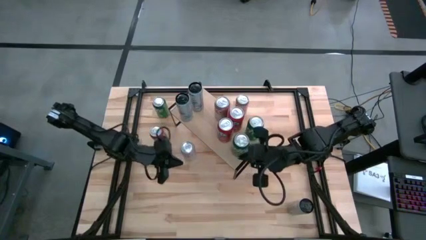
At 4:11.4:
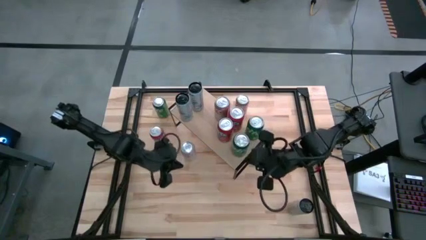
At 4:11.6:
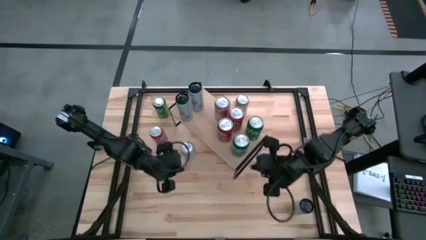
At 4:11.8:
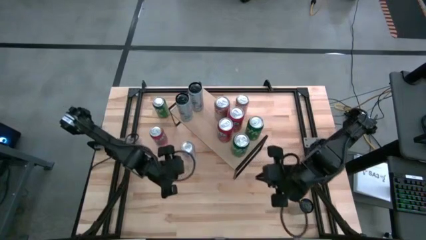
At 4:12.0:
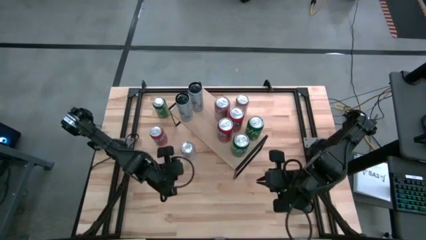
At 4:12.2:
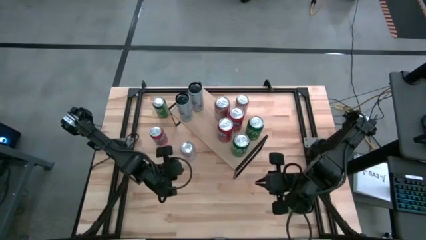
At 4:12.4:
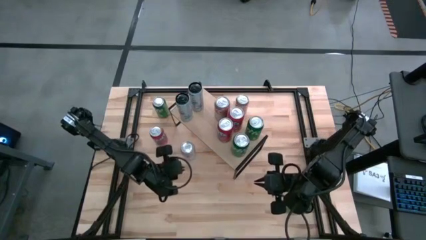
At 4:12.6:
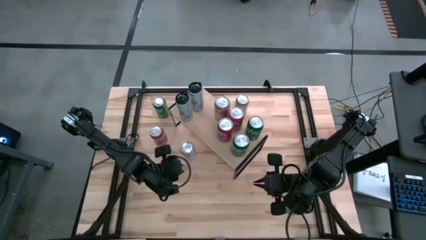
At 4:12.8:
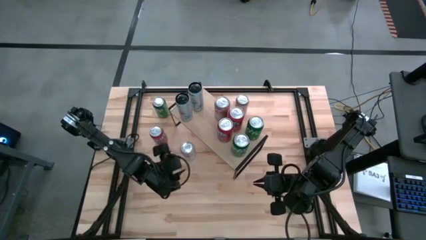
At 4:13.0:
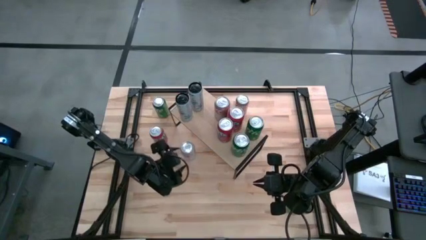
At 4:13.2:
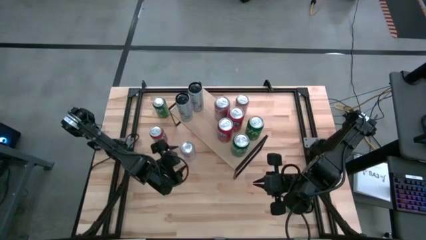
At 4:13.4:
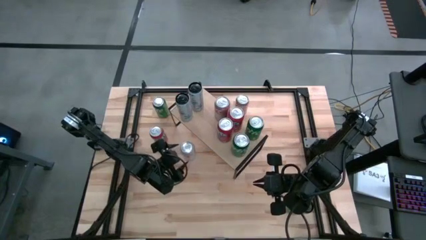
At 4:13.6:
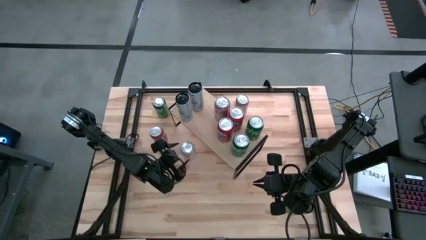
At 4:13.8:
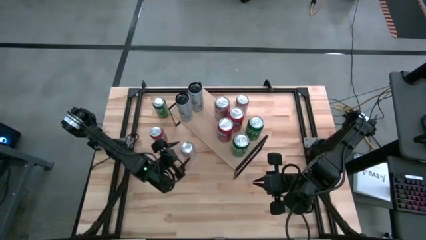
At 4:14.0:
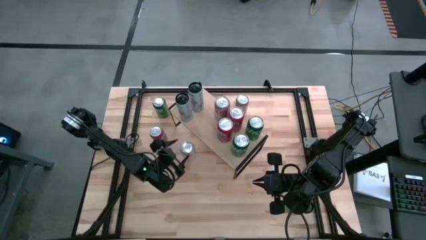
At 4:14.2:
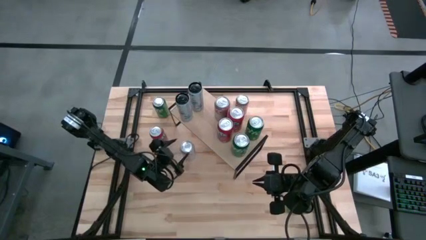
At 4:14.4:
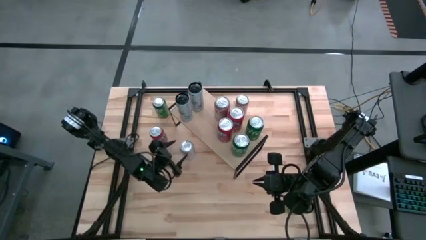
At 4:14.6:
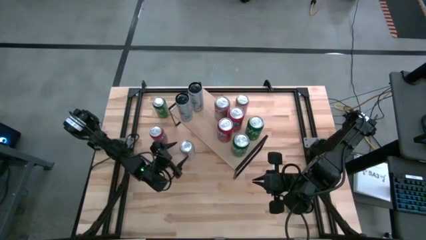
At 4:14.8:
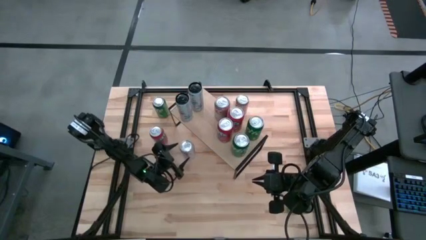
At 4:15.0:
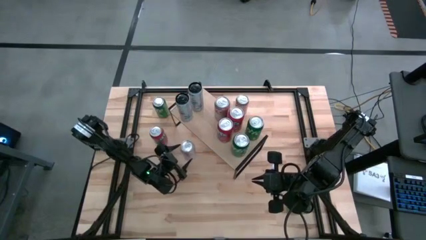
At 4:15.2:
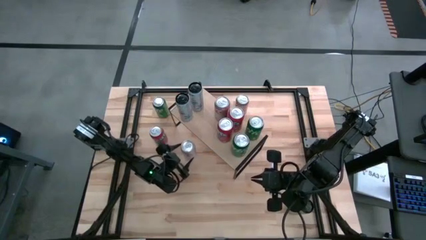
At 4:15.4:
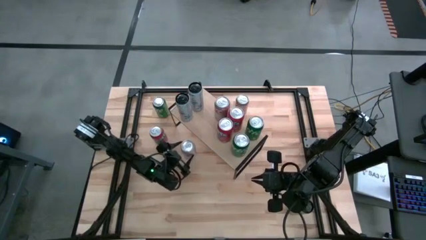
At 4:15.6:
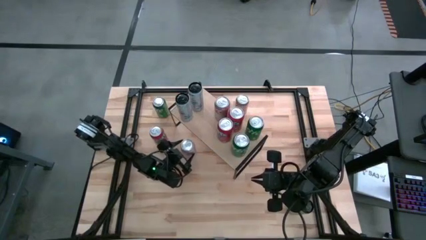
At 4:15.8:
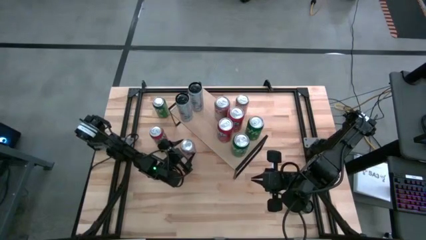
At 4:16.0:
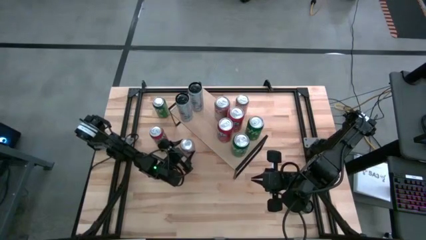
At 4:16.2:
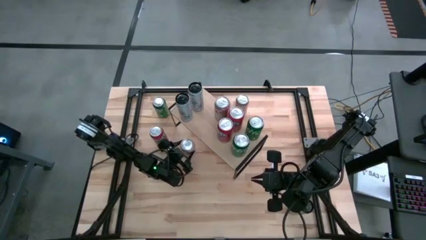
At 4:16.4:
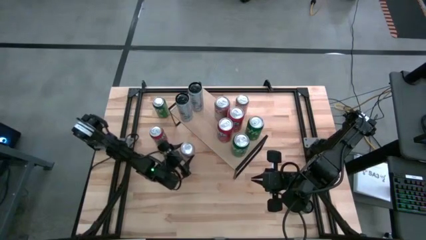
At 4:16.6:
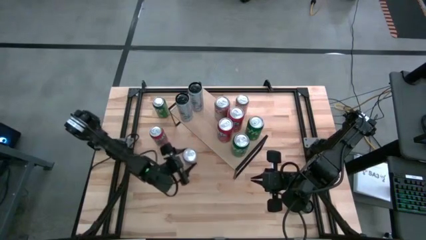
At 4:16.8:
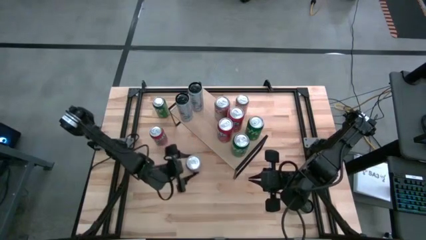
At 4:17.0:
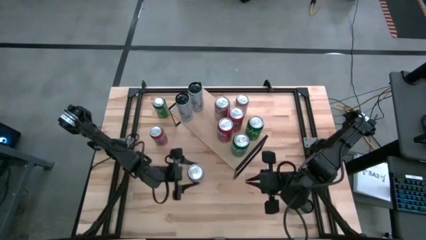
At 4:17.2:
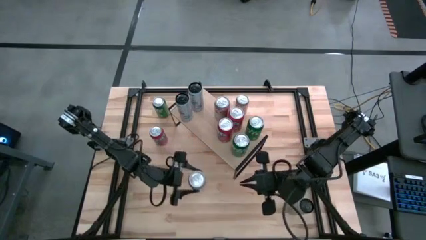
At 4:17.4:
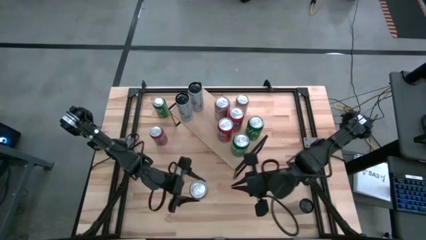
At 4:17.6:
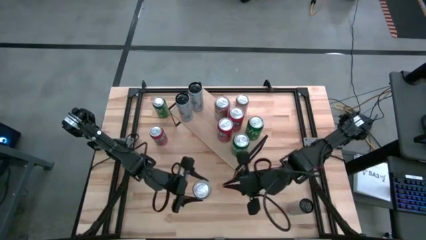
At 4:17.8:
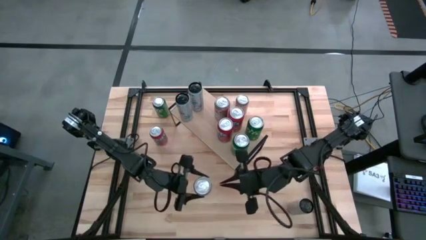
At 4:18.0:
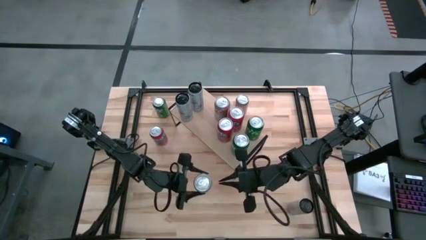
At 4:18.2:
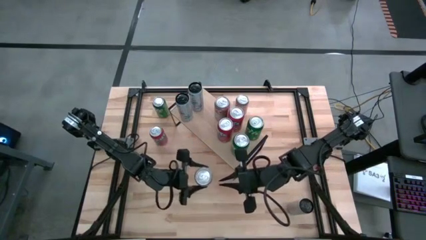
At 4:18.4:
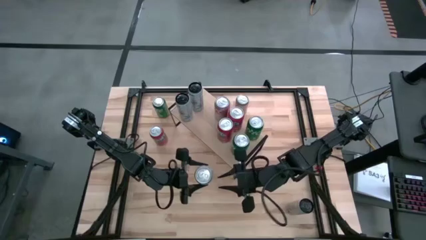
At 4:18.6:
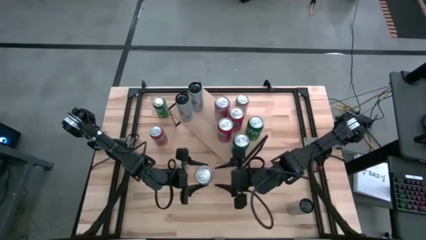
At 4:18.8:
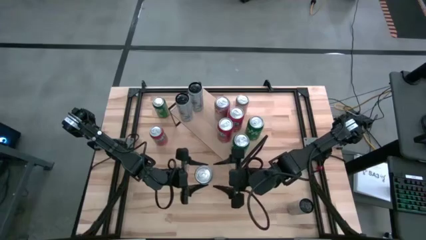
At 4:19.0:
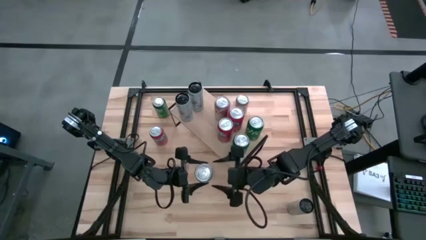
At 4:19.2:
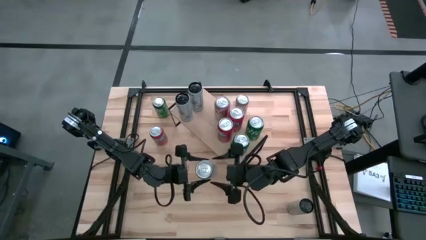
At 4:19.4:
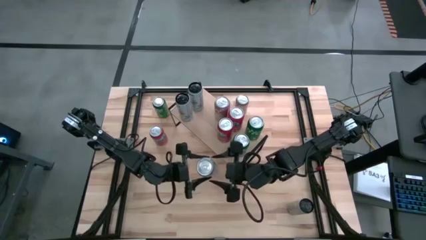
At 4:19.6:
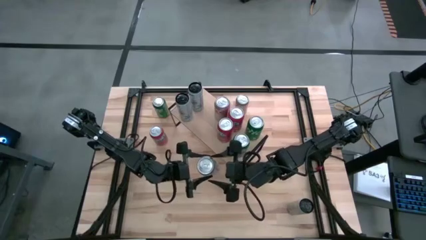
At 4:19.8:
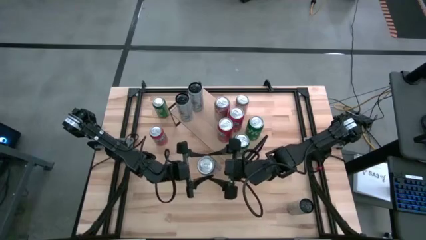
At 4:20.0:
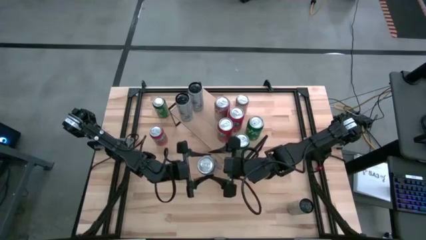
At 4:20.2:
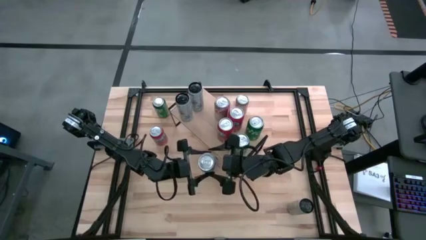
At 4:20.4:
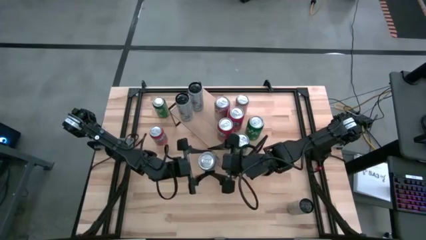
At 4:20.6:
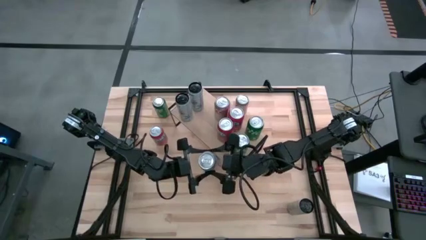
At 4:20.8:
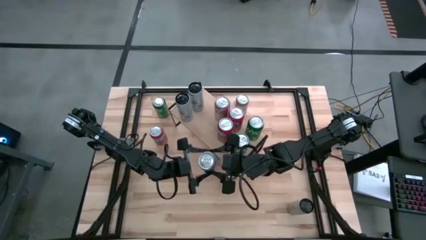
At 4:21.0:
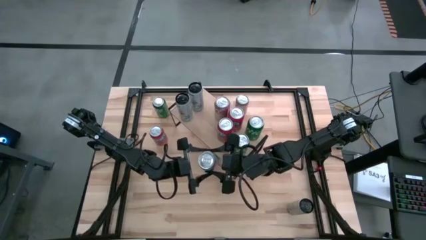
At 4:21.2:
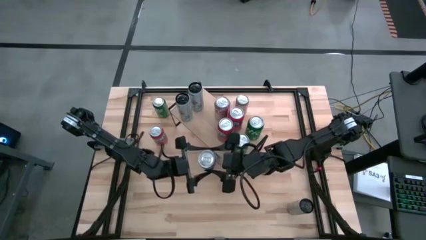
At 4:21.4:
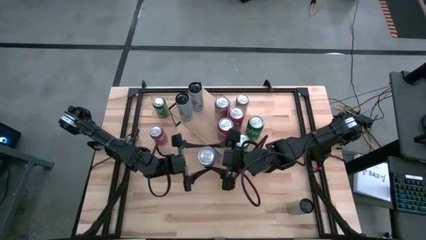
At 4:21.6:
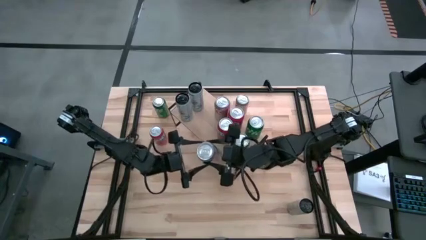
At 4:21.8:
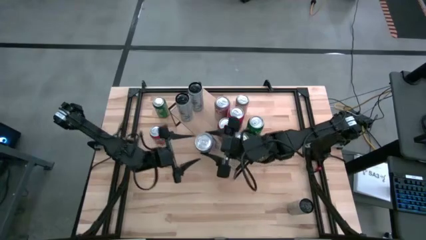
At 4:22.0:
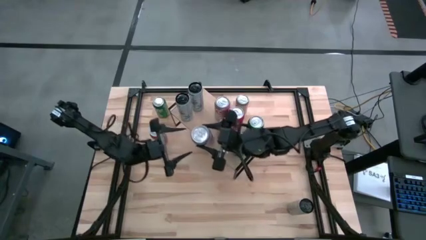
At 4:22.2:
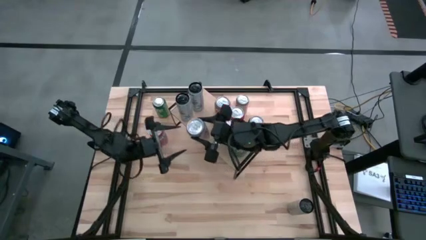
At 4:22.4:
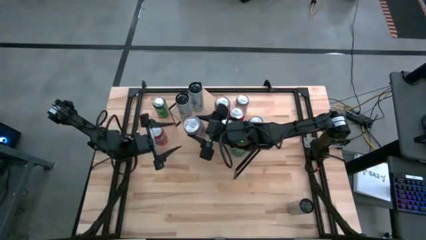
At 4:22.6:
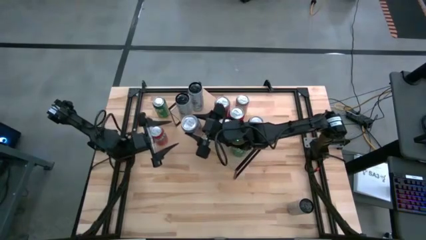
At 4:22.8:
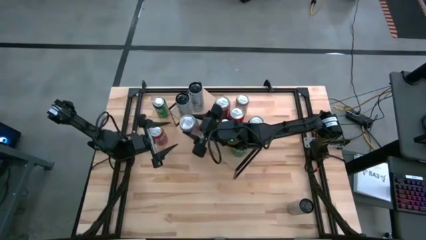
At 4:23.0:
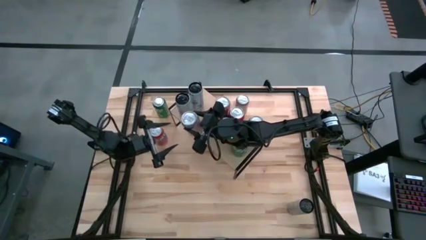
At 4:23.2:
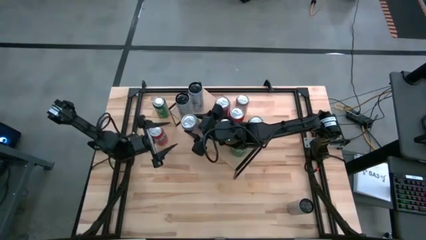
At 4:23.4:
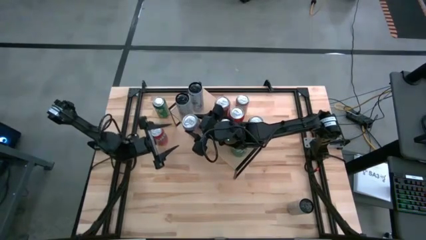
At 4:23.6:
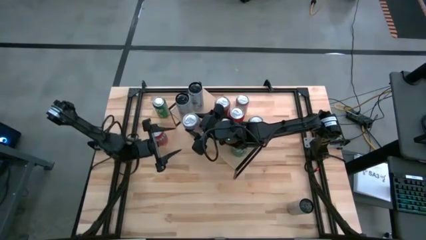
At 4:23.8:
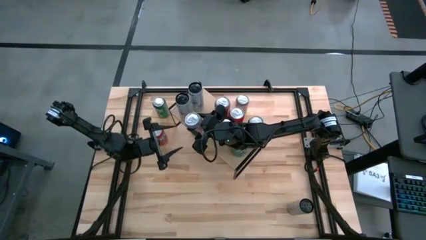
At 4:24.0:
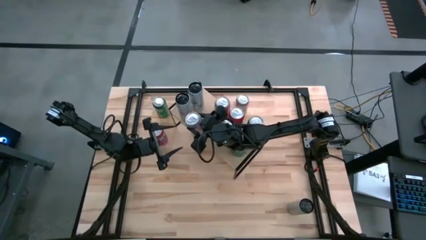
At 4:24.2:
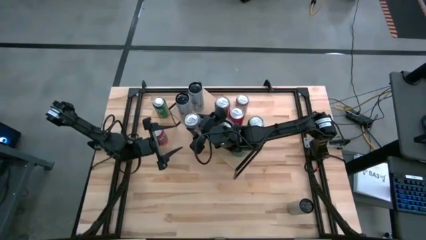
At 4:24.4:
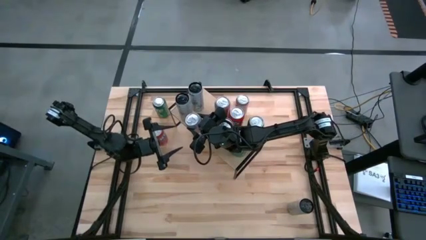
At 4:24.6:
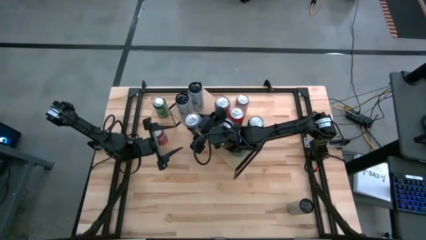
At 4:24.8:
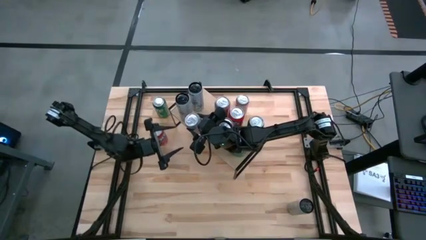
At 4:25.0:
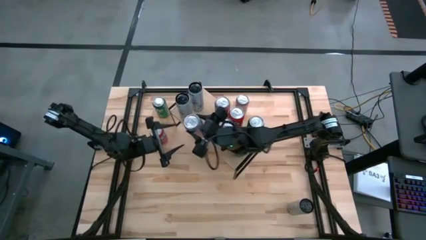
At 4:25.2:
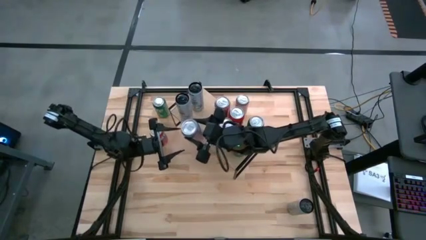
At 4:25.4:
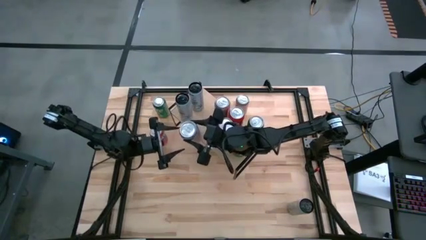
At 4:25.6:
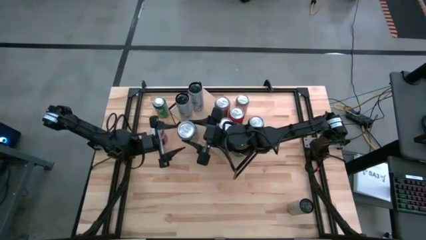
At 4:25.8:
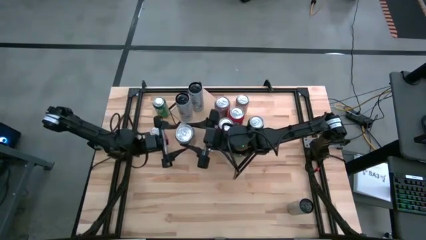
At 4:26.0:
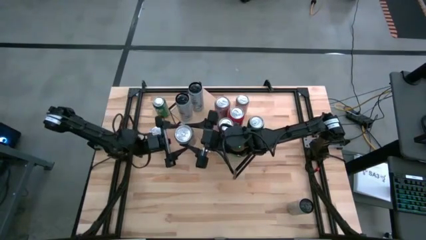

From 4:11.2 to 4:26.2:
Task: Place canned beverage on shelf
Put the silver soda can on the shelf aligned with the other silver soda can

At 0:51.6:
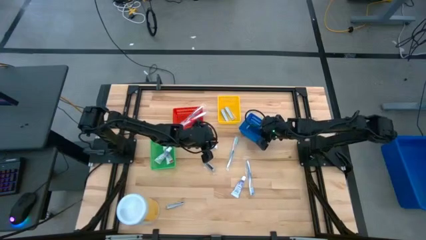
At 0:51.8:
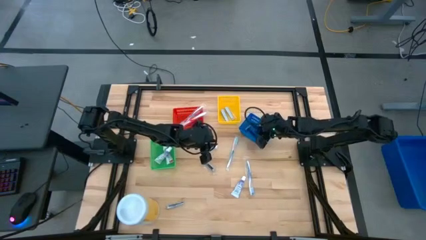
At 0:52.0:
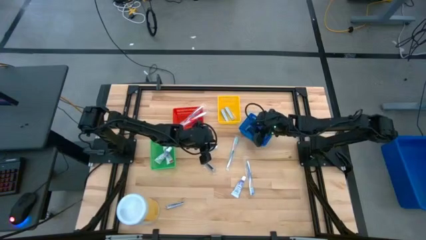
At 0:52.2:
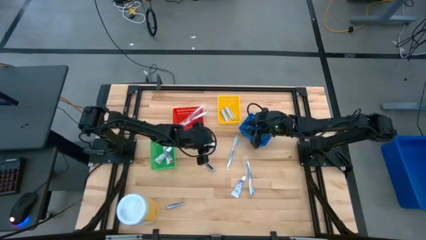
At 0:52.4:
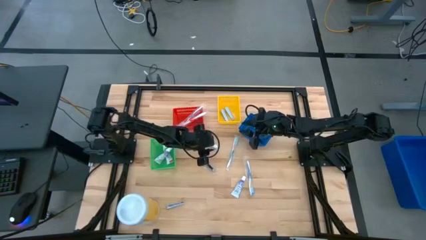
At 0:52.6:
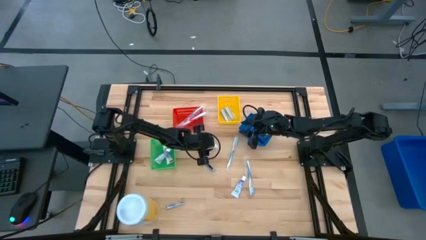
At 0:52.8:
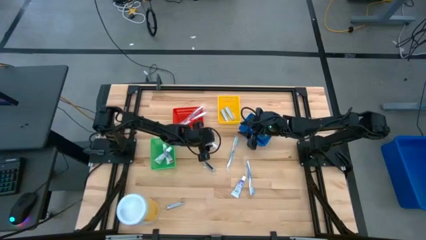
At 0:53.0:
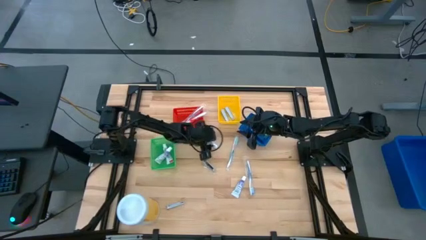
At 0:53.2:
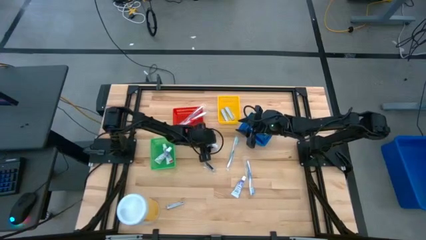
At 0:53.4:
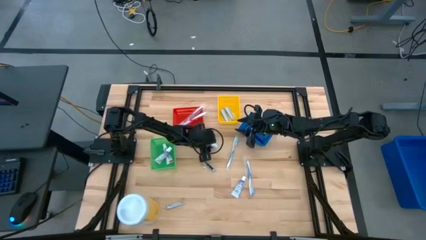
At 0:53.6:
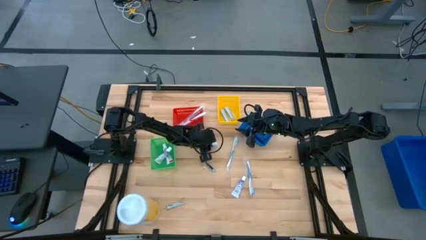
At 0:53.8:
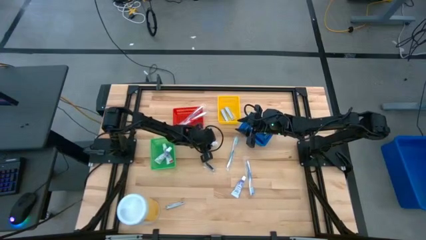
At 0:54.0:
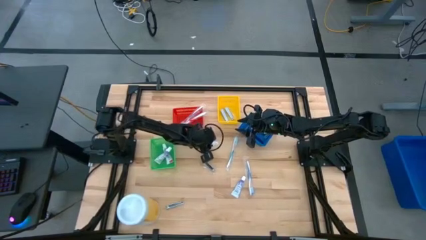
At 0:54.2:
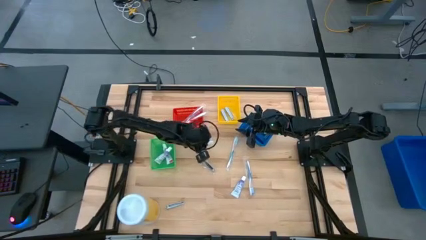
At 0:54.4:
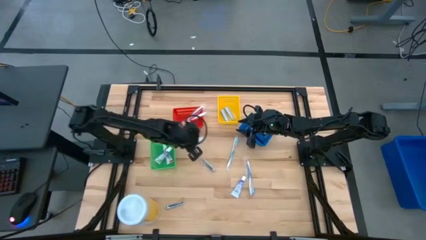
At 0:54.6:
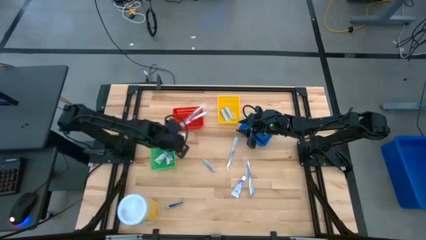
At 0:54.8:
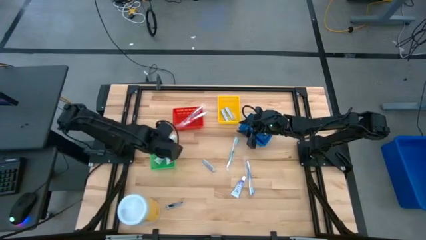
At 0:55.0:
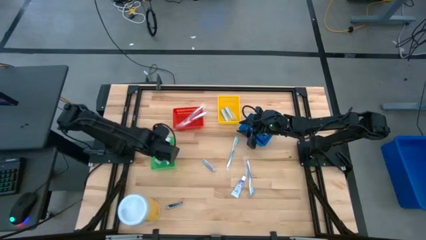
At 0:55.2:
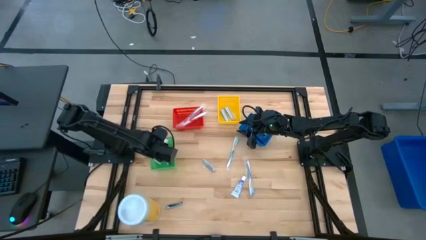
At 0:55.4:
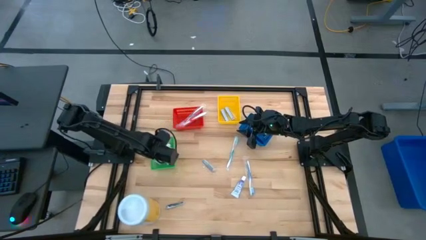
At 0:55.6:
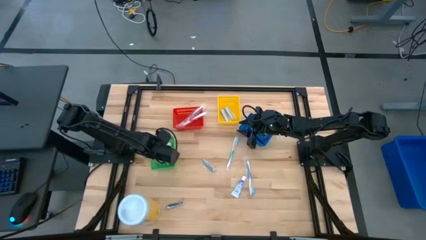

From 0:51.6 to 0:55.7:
Task: Pick & Place Travel size toiletries
Put the white toothpaste the green bin
